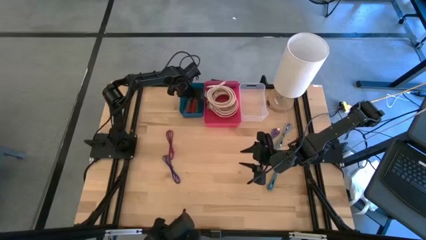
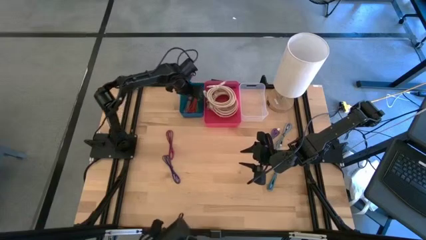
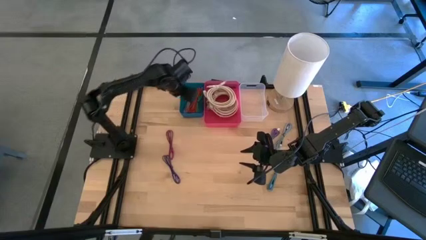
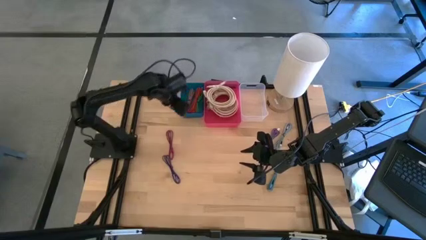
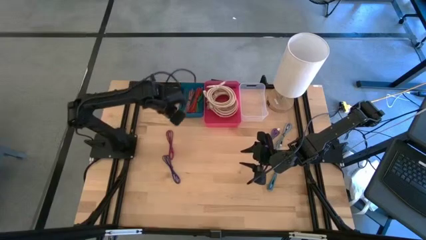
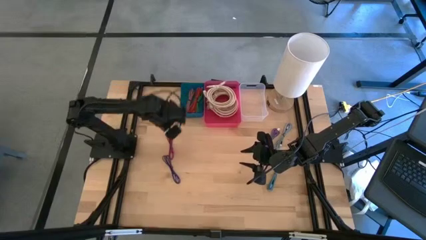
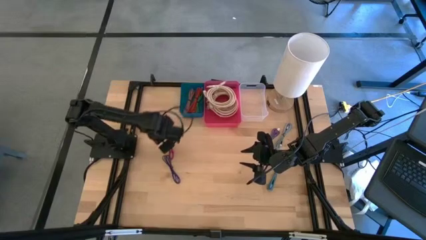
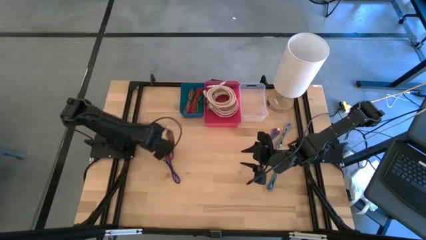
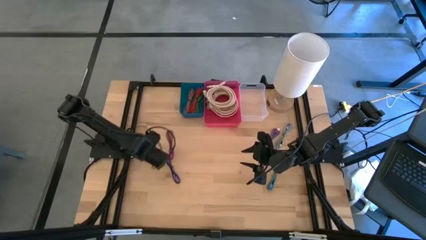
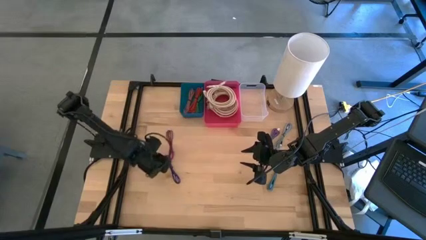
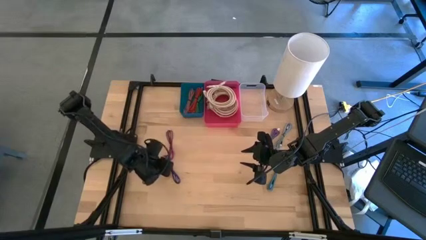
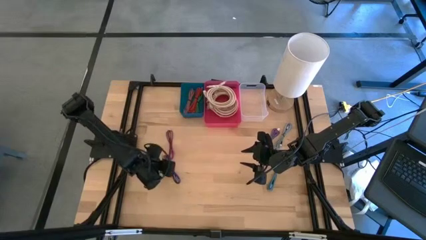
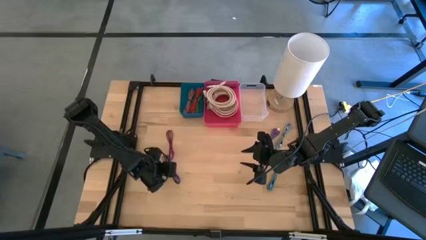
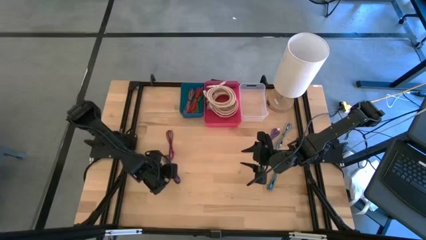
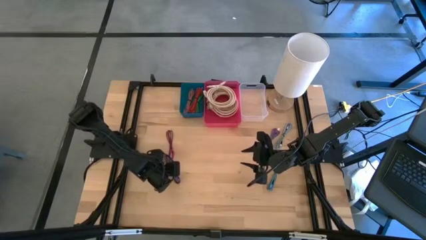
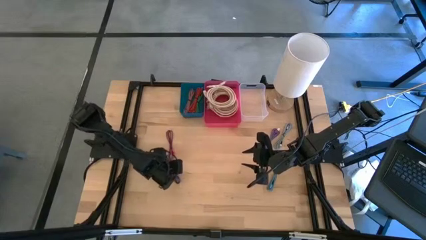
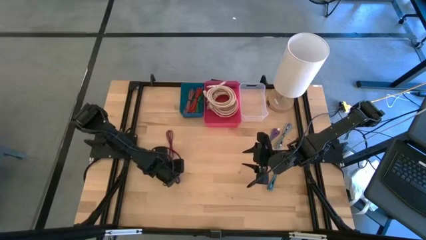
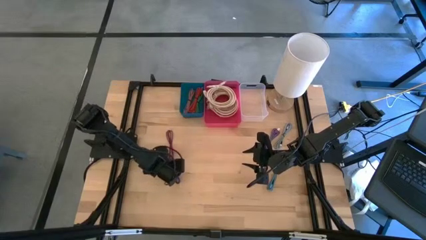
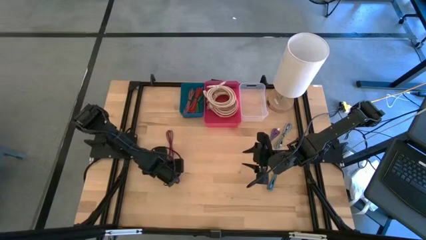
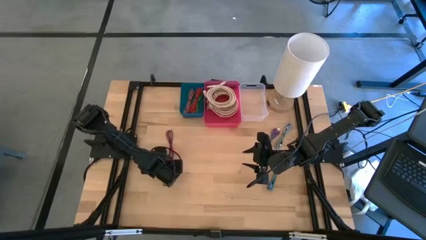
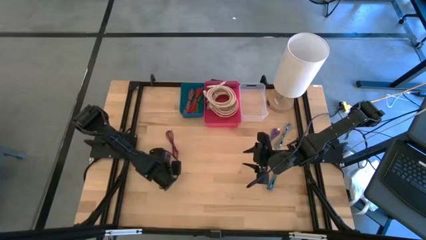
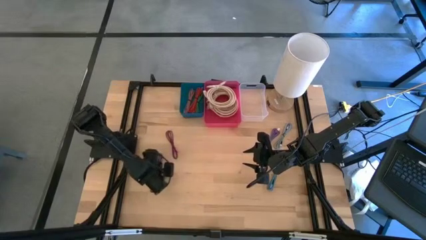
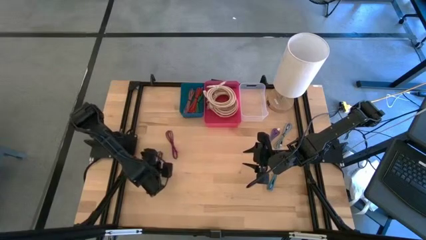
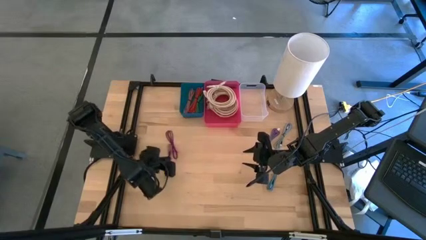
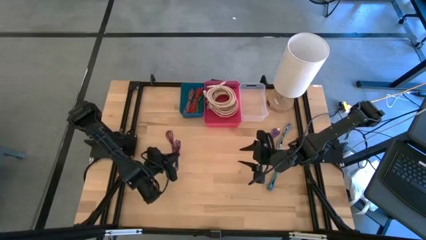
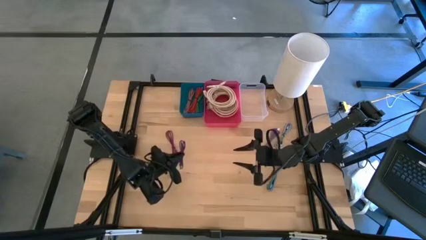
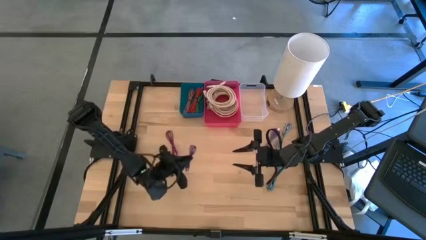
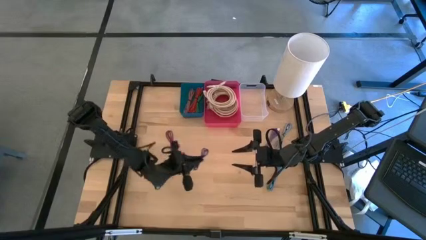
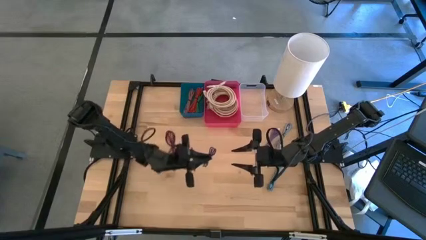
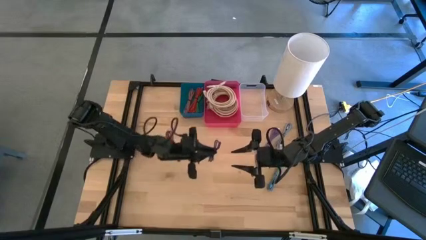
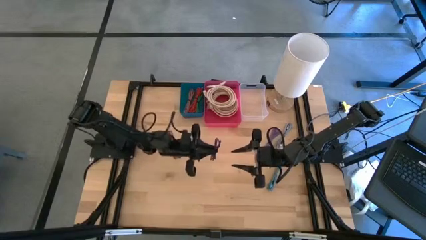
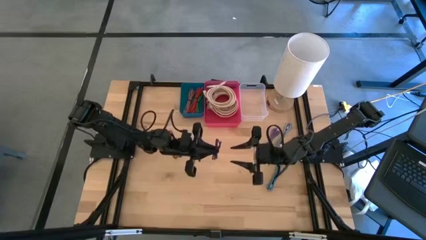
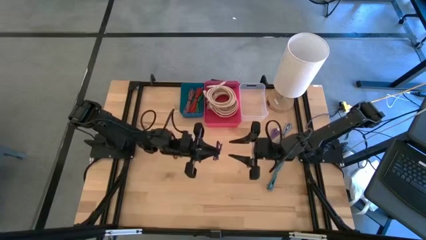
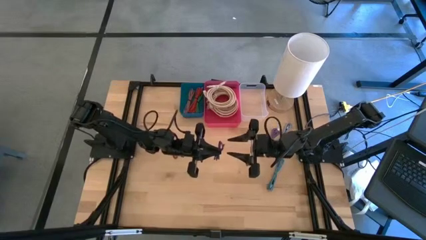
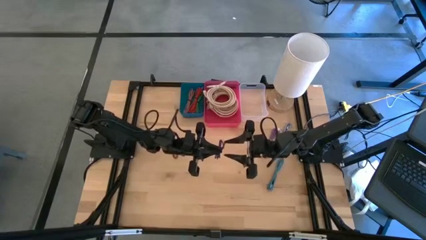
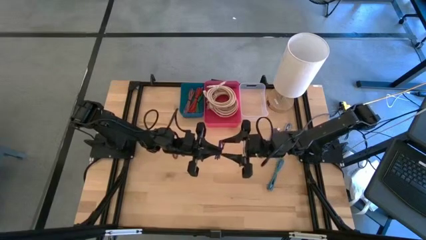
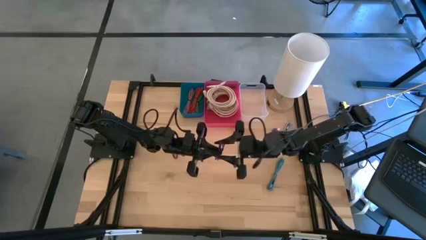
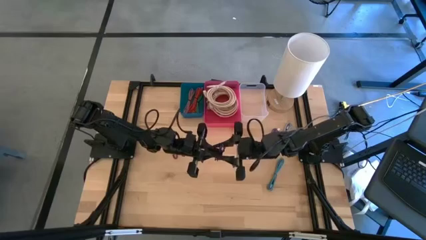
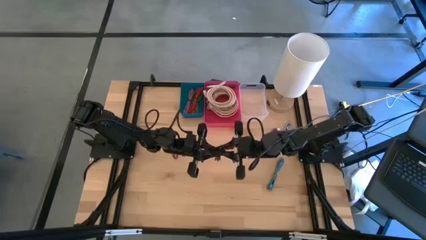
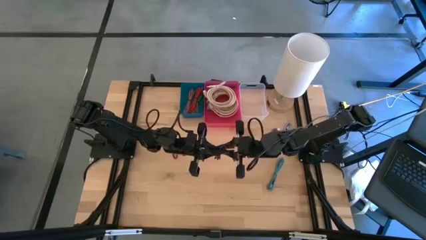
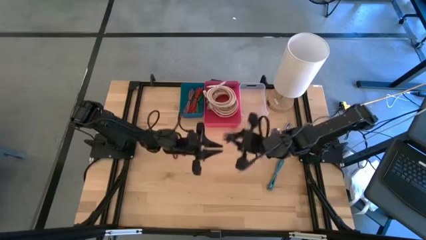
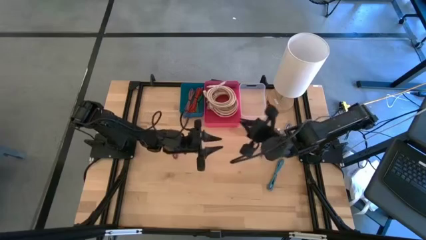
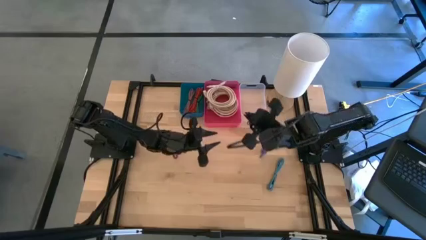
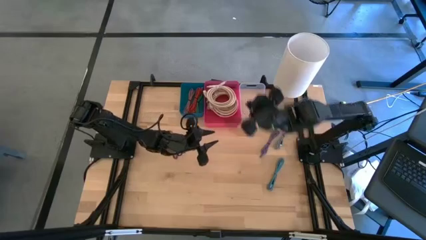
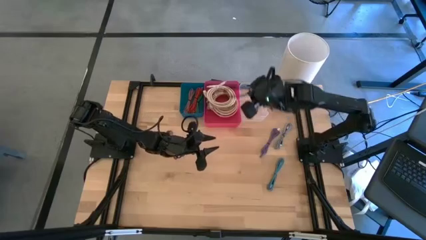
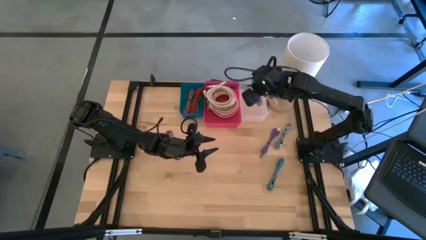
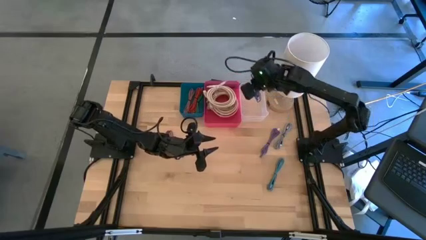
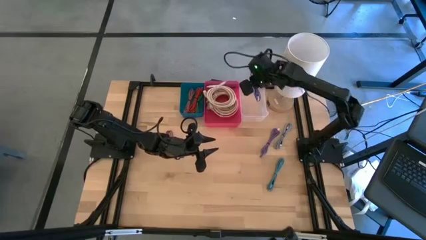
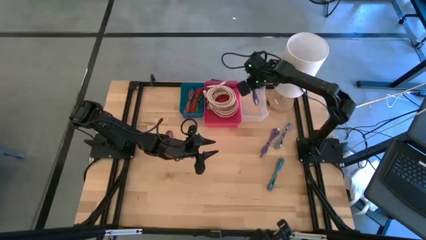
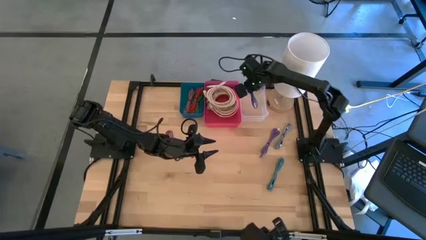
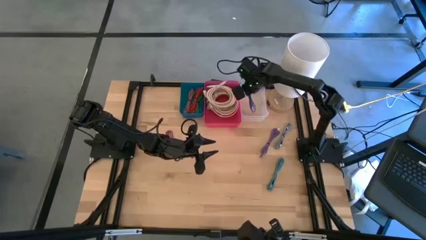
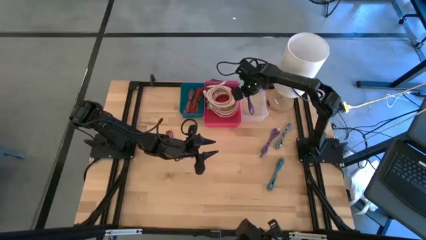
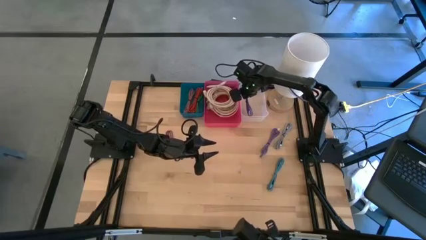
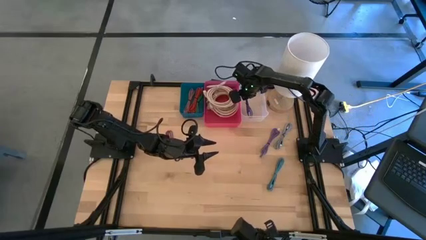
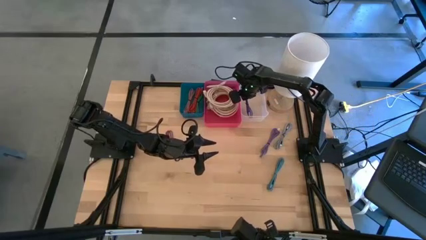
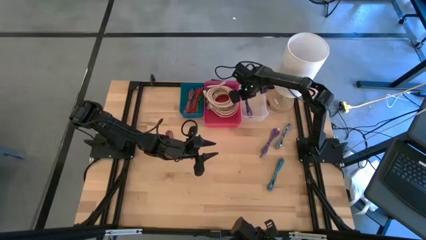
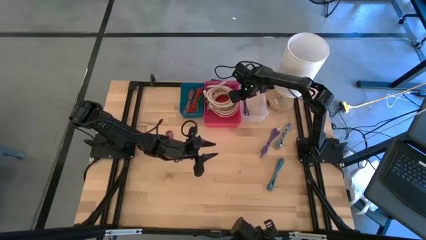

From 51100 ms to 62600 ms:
Task: Pick & Place USB Port
Put the violet patterned charger cable into the transparent bin

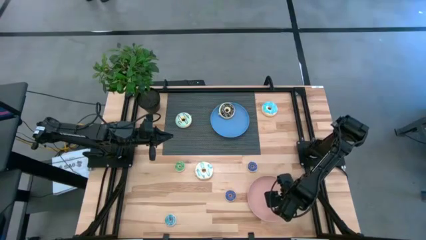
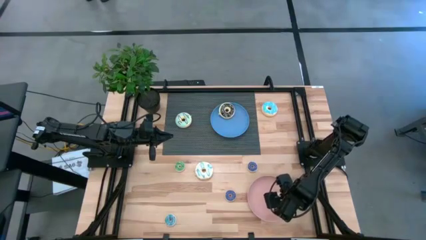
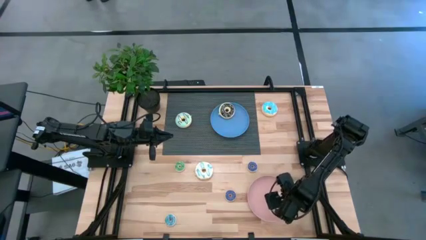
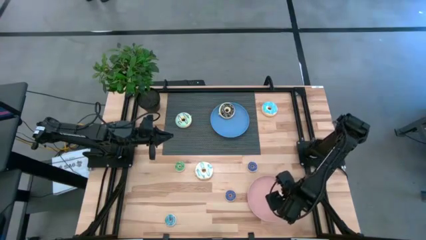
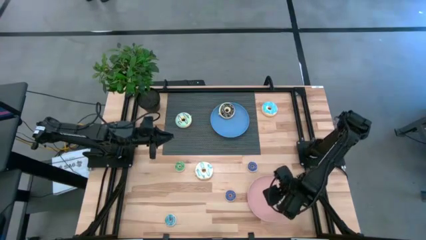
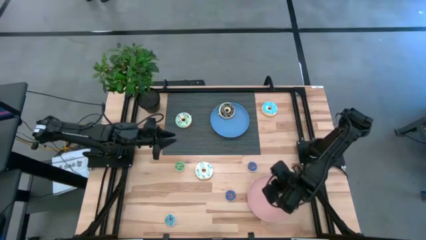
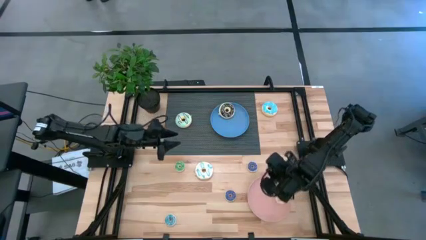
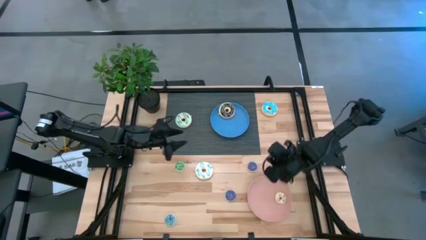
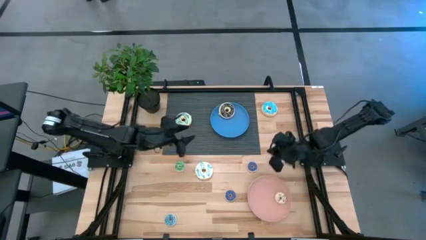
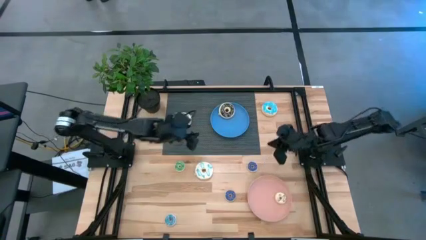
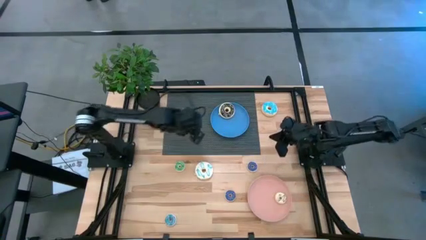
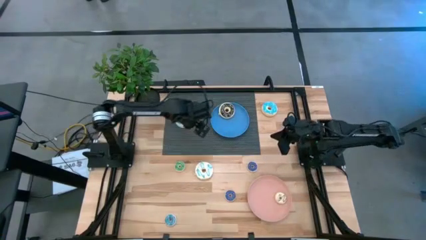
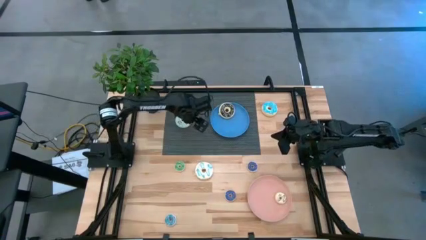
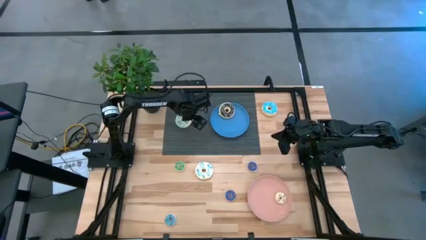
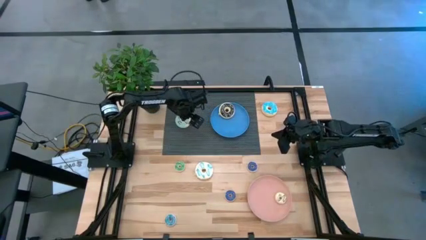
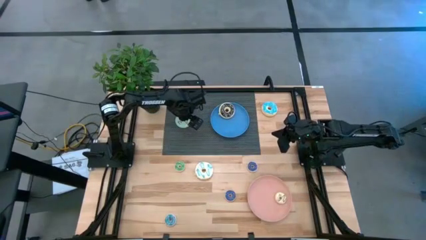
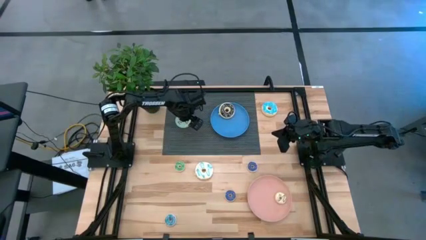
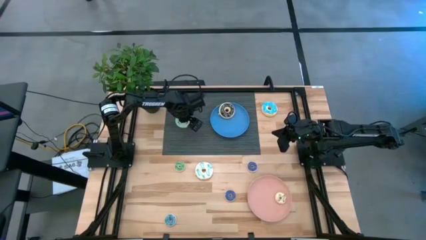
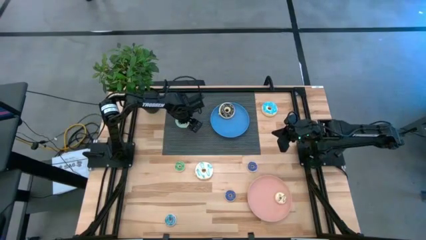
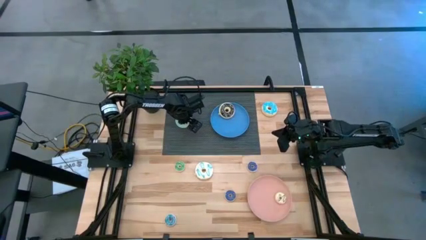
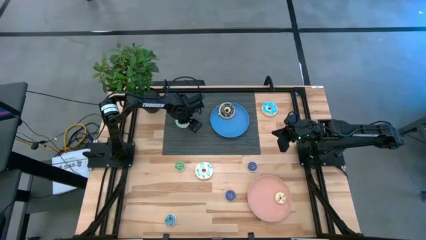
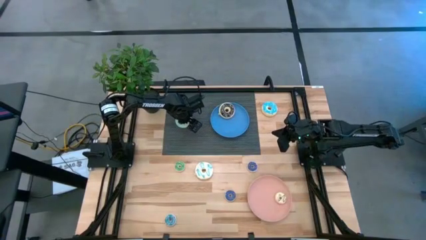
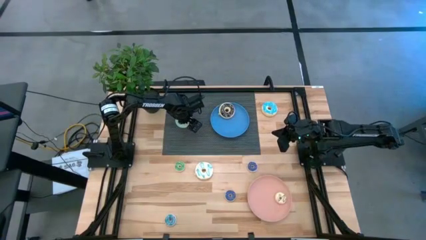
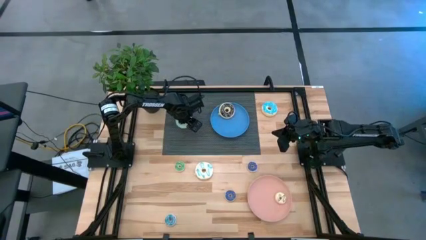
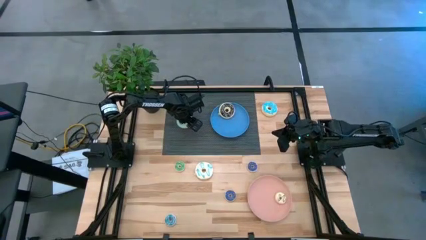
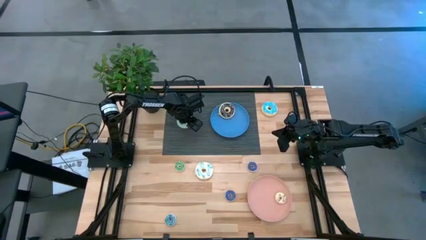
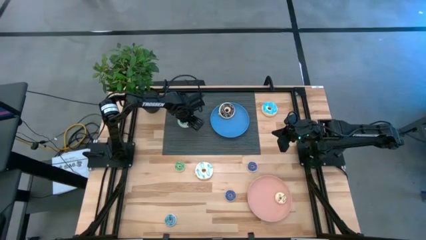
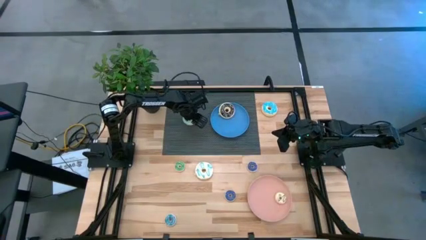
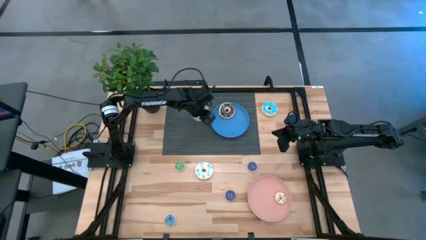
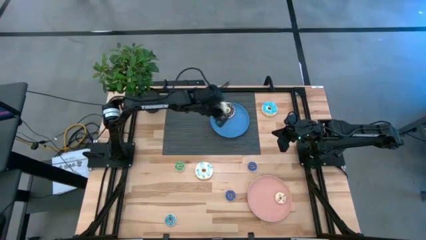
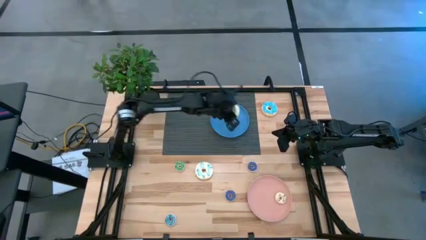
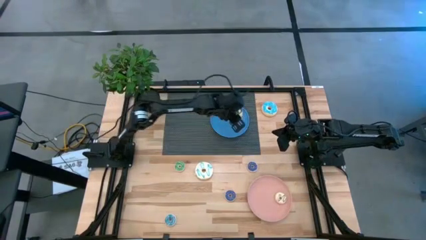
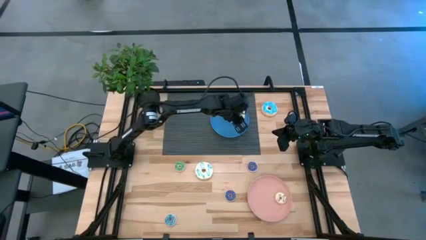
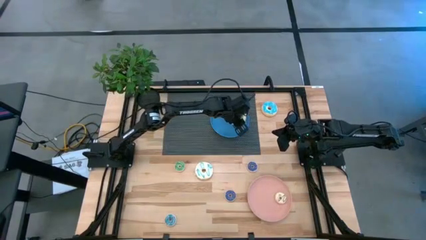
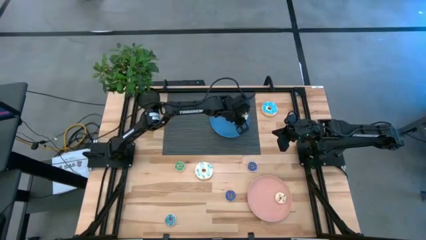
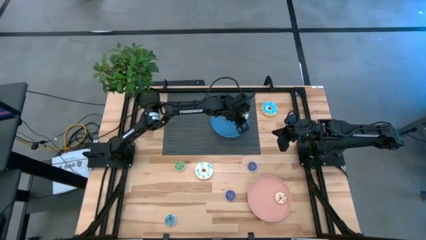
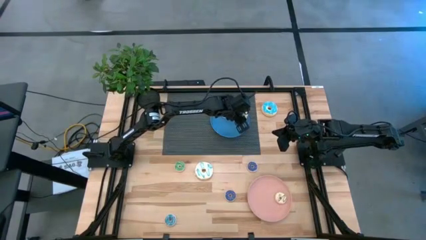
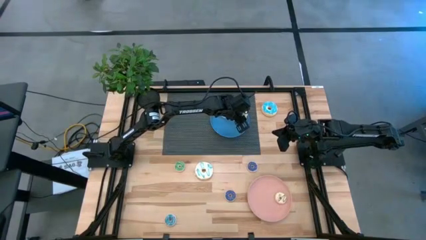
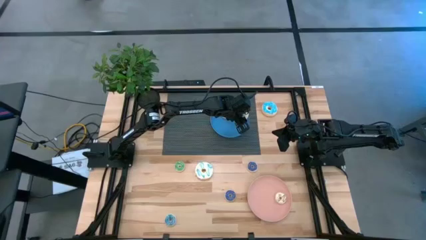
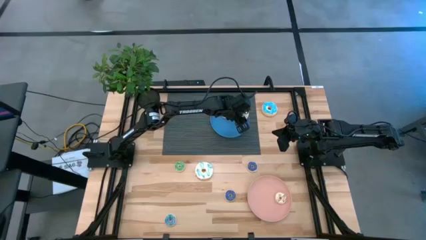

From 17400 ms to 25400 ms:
Task: Pick & Place donuts
Put the large light blue donut on the blue plate
